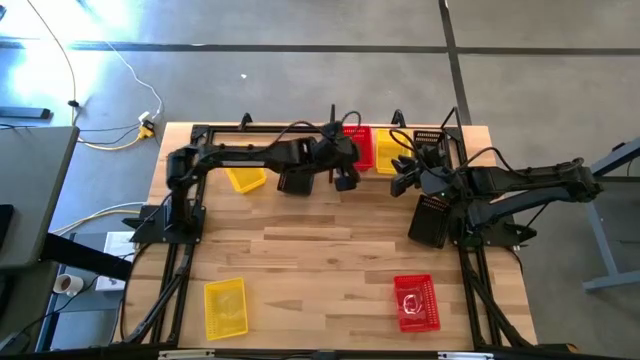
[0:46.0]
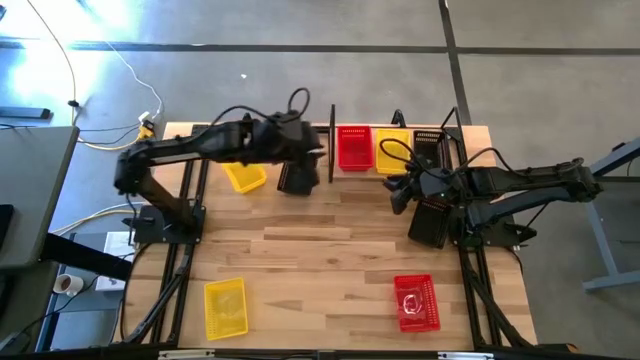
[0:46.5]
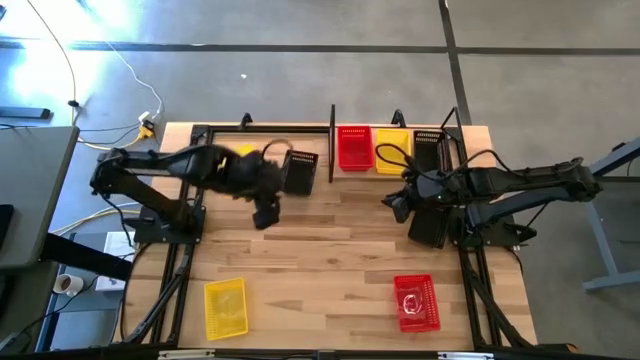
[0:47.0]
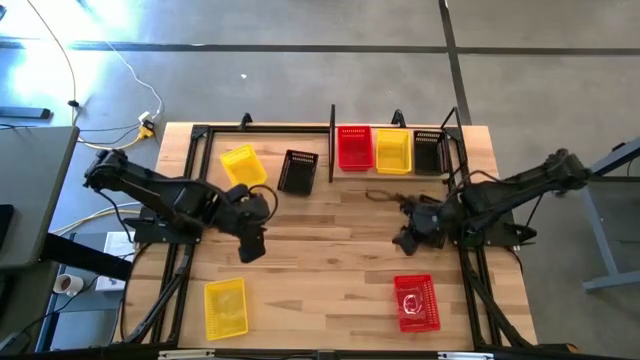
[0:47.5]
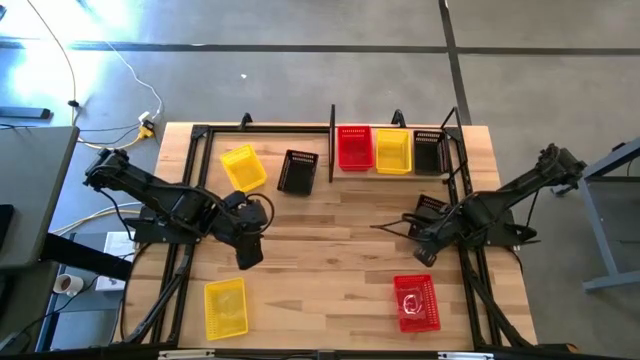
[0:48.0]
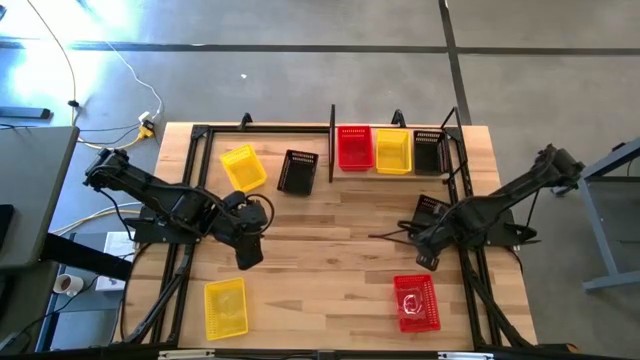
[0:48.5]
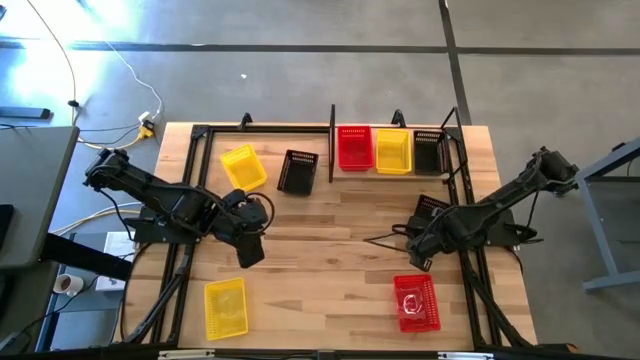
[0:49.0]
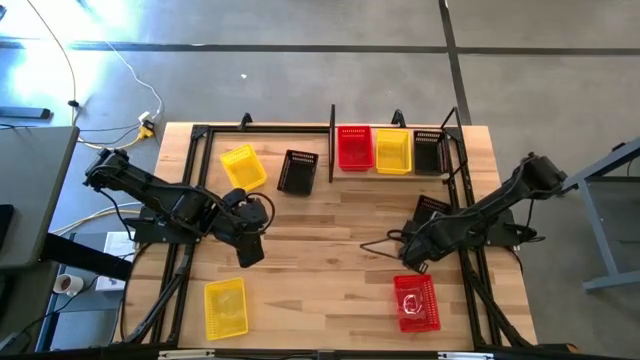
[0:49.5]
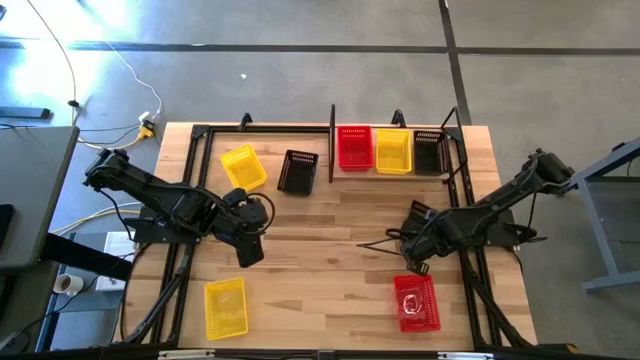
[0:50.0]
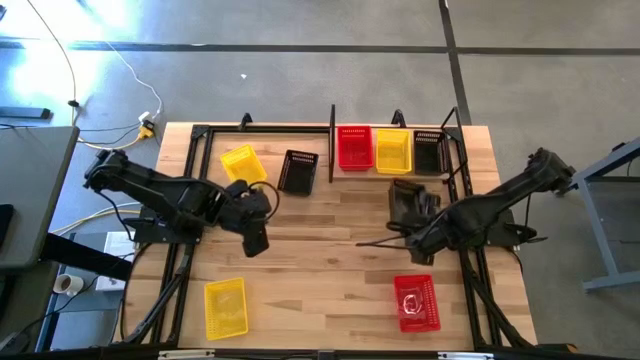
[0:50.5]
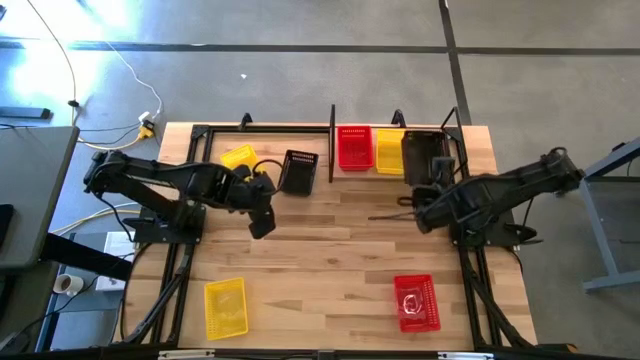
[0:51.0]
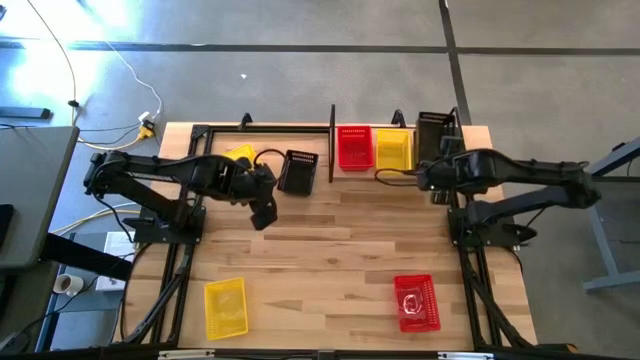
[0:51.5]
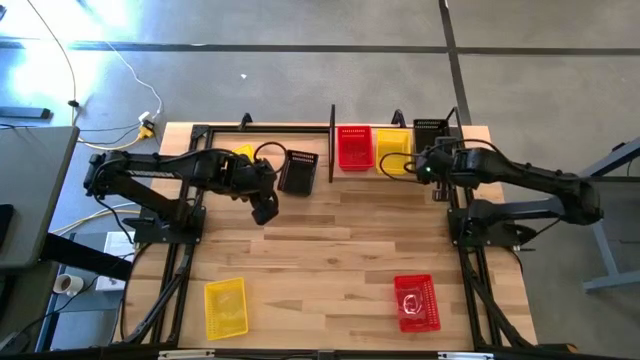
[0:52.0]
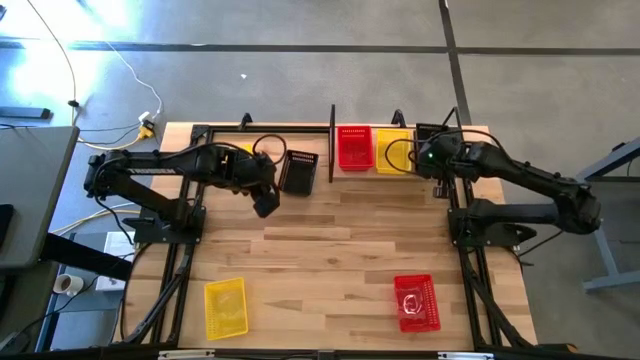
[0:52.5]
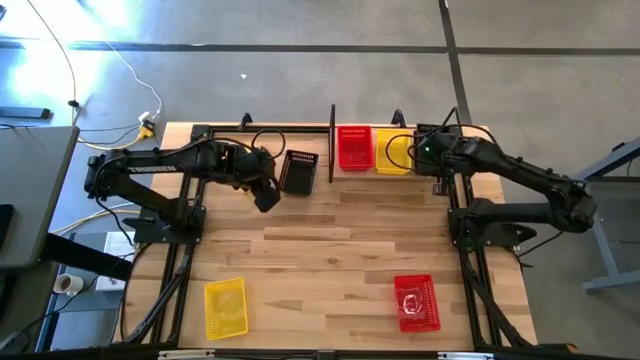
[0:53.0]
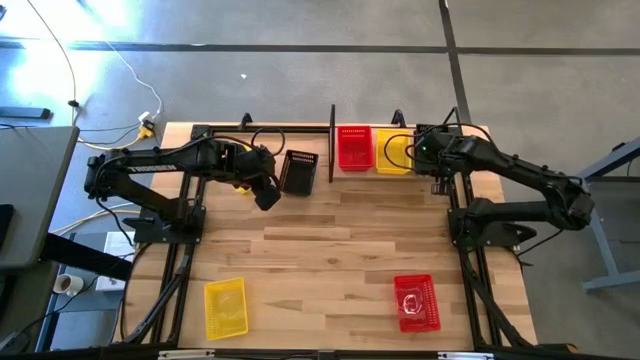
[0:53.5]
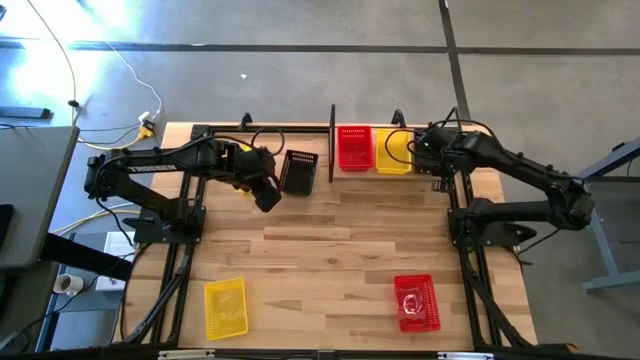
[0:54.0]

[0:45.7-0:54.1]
Task: Stack baskets on shelf by color
Stack the right black bin on top of the black bin on the shelf

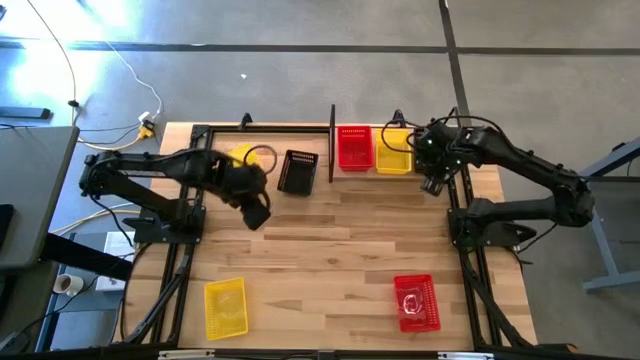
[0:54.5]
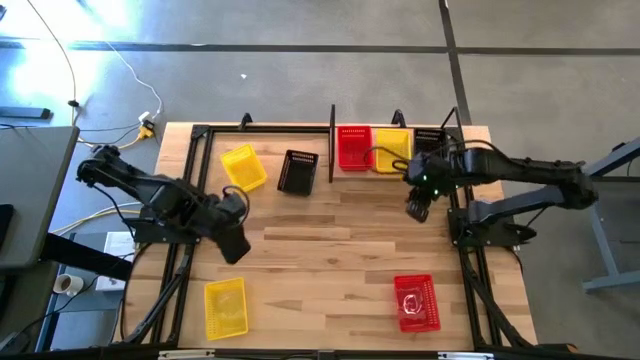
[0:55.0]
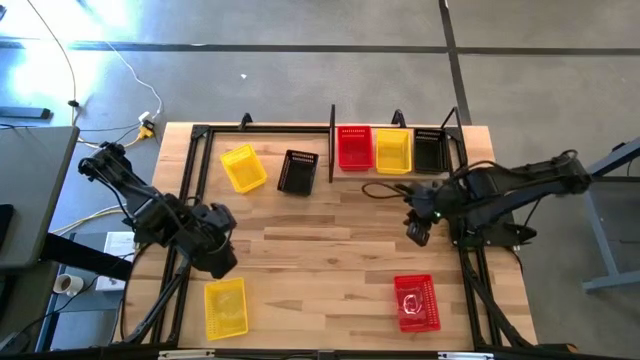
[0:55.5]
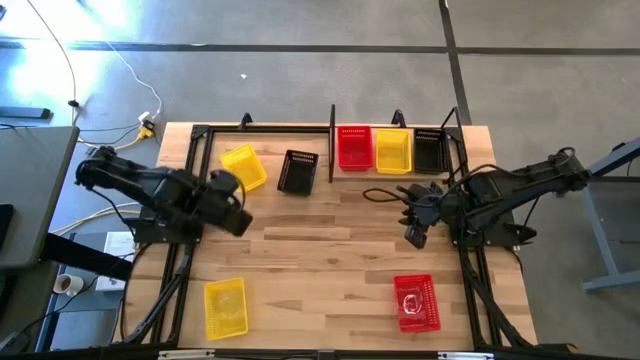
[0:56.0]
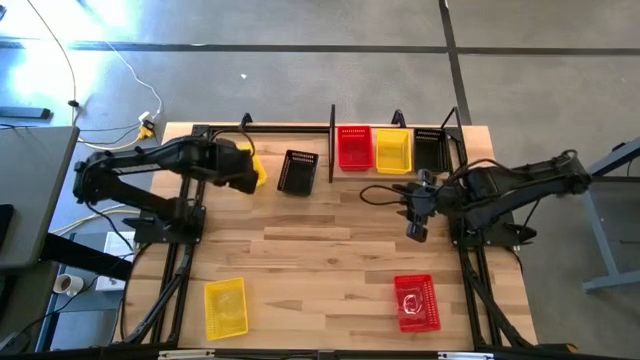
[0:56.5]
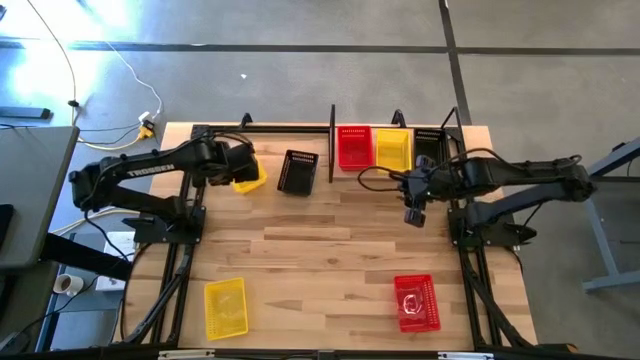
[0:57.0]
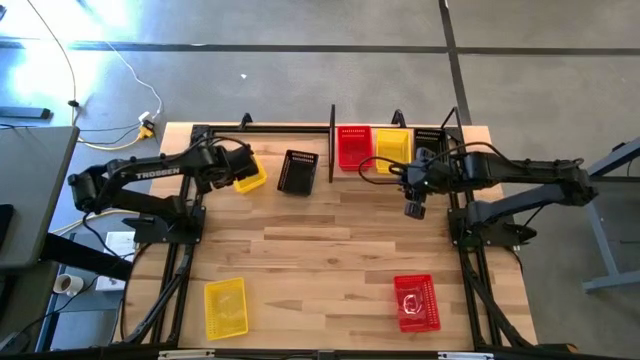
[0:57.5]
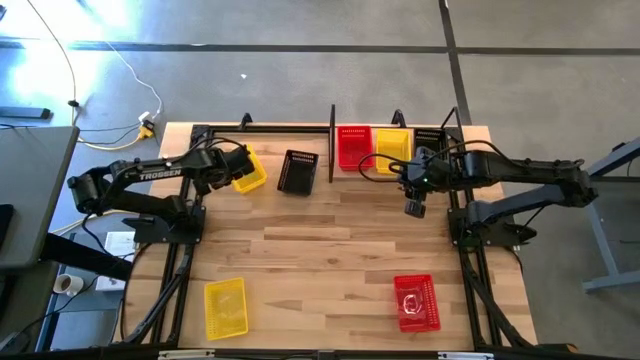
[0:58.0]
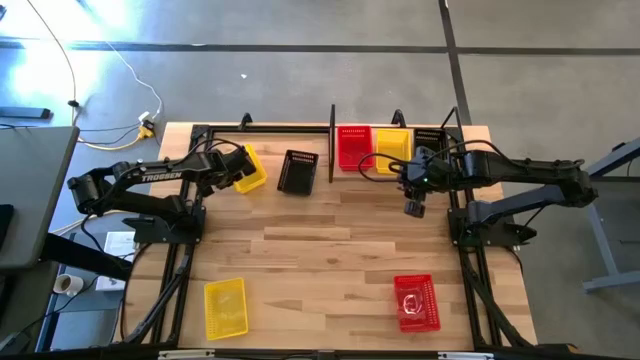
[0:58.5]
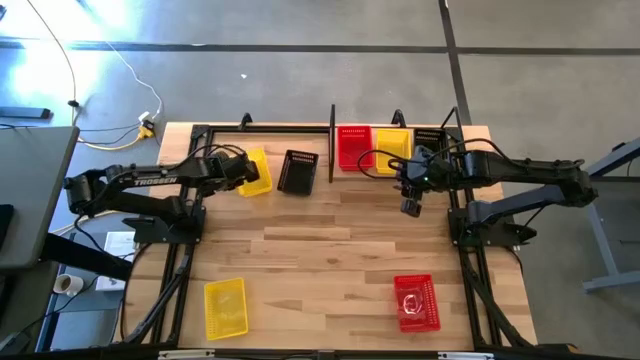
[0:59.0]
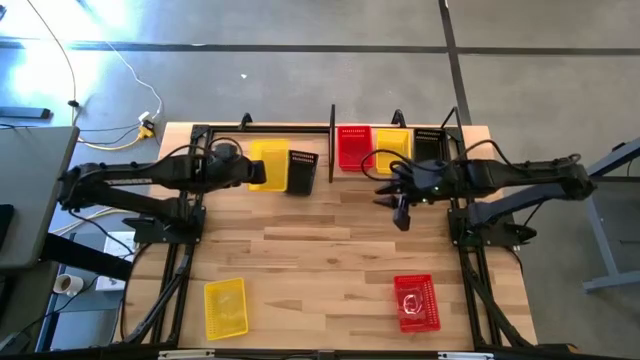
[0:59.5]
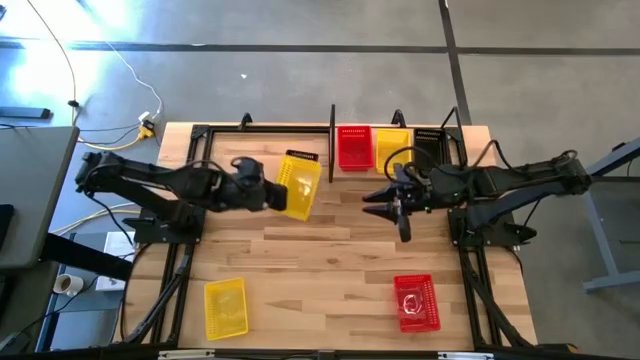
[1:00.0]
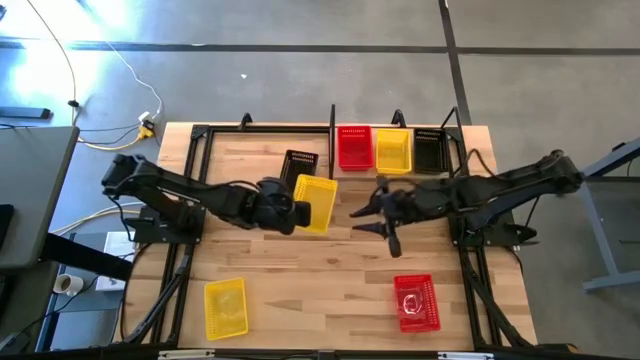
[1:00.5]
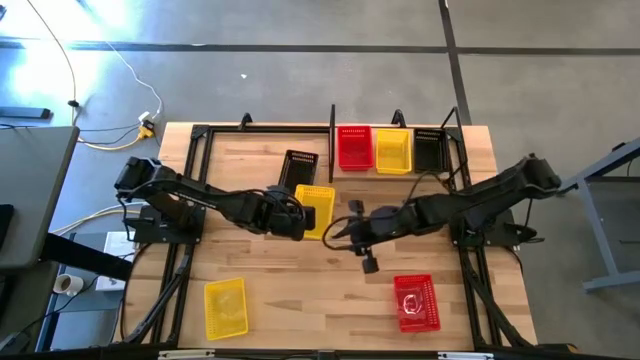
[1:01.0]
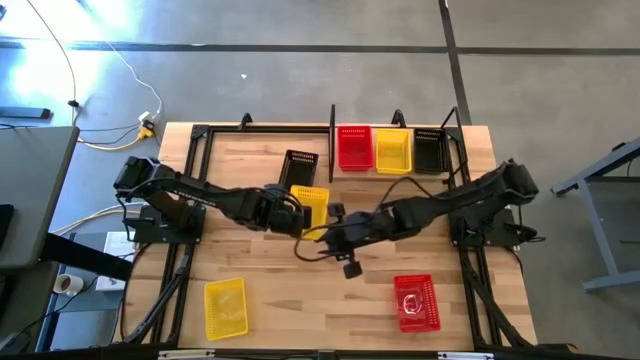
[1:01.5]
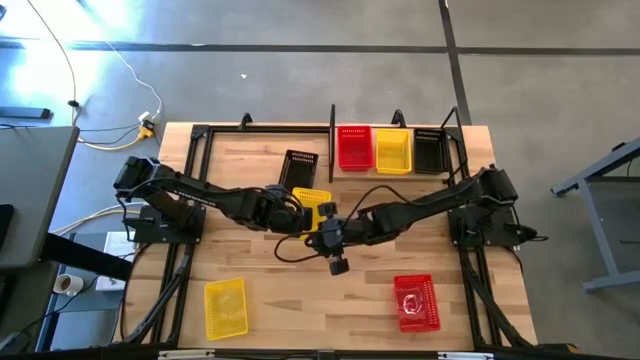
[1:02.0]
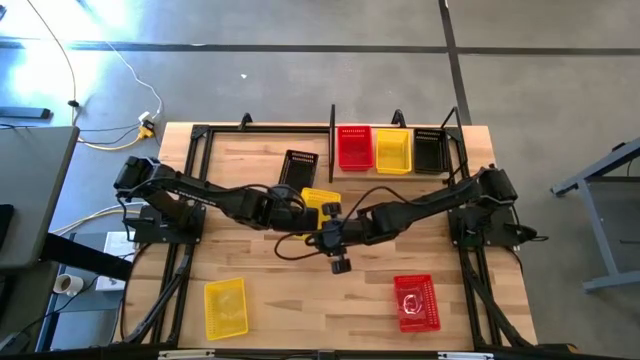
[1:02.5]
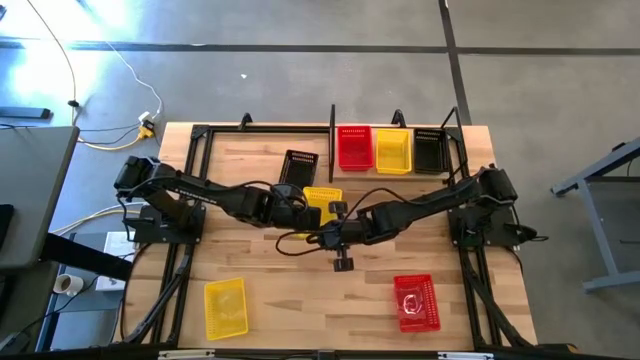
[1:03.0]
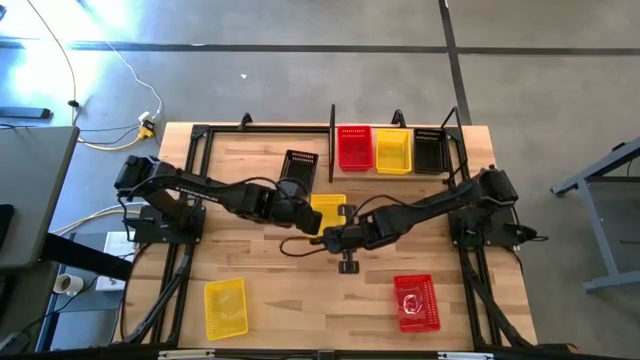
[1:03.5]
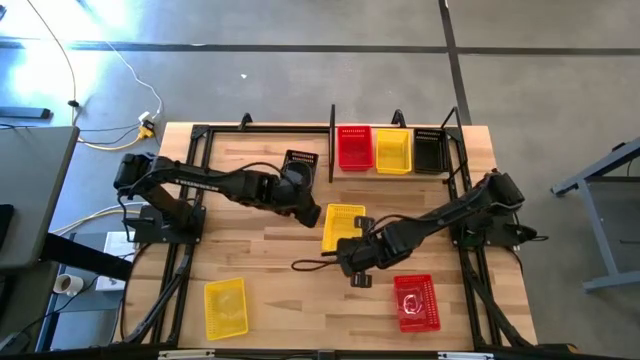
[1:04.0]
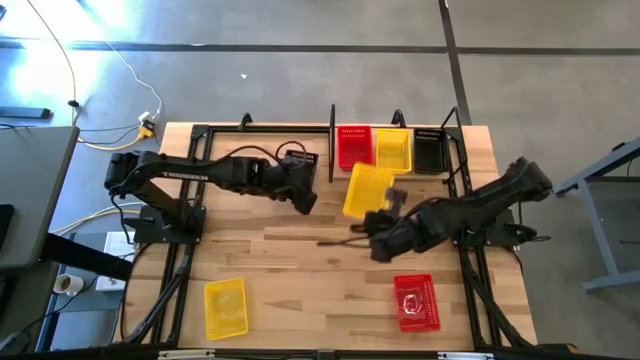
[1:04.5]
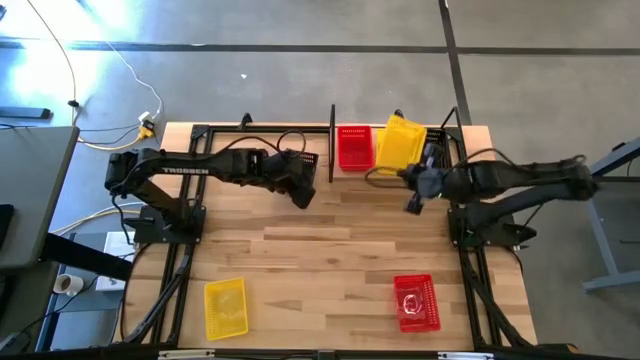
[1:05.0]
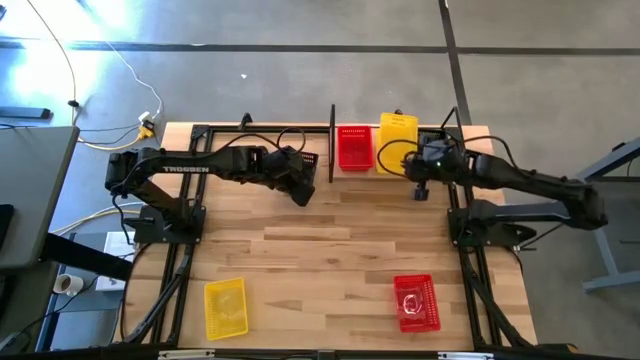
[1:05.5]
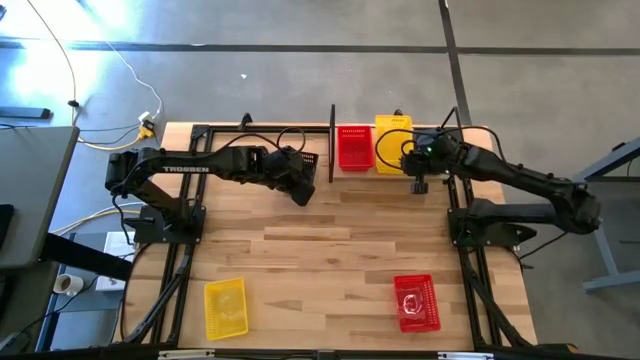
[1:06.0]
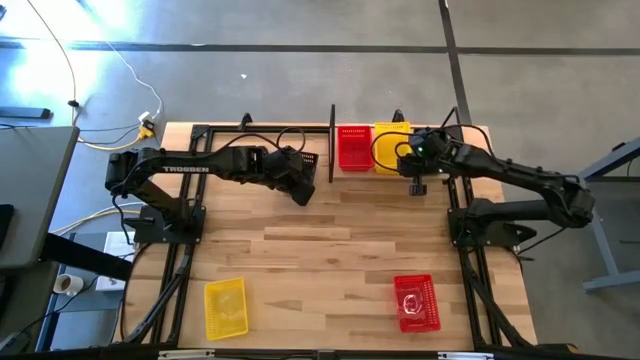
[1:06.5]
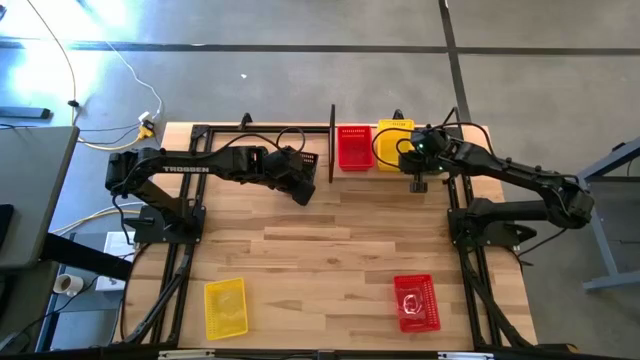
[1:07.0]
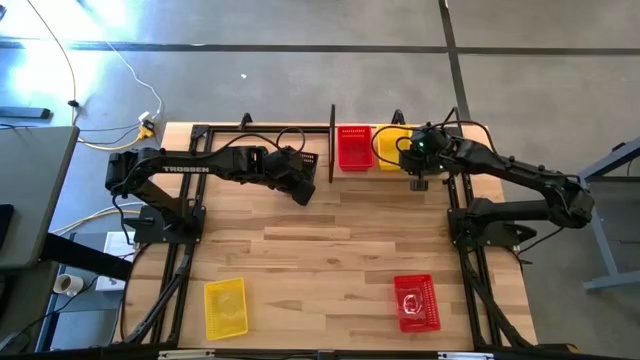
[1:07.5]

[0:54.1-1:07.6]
Stack the top yellow bin on top of the yellow bin on the shelf
